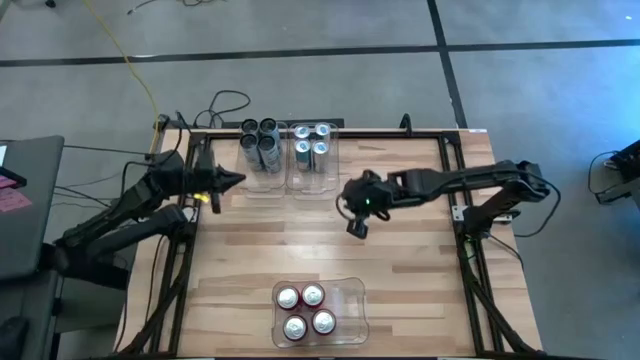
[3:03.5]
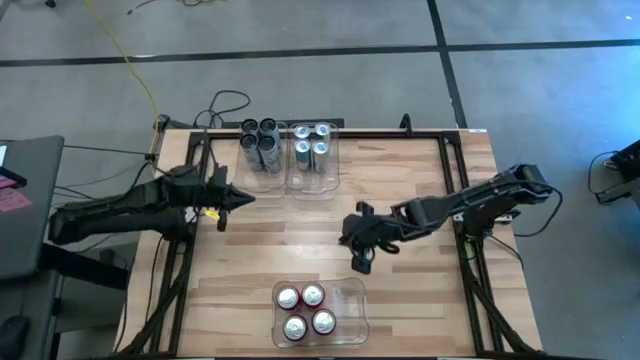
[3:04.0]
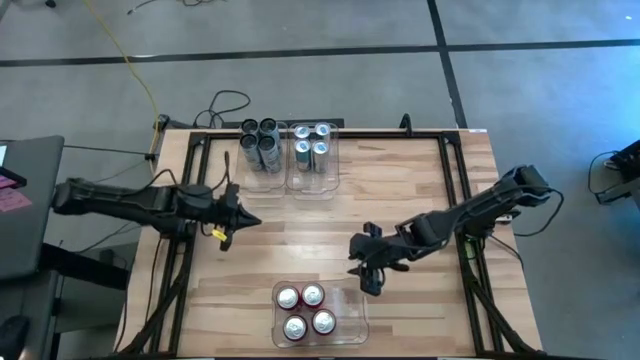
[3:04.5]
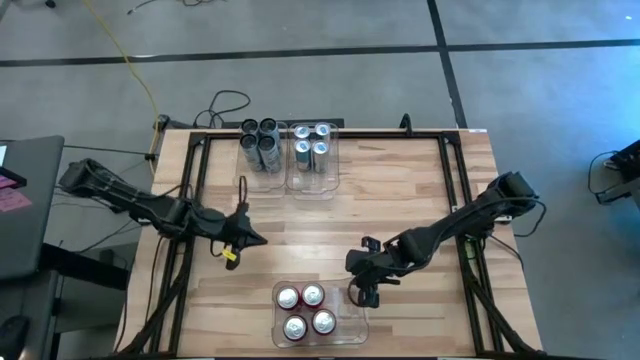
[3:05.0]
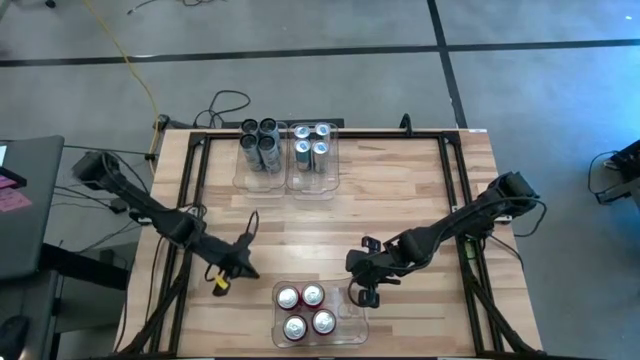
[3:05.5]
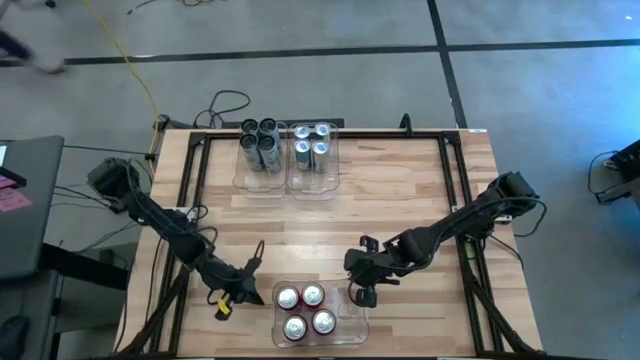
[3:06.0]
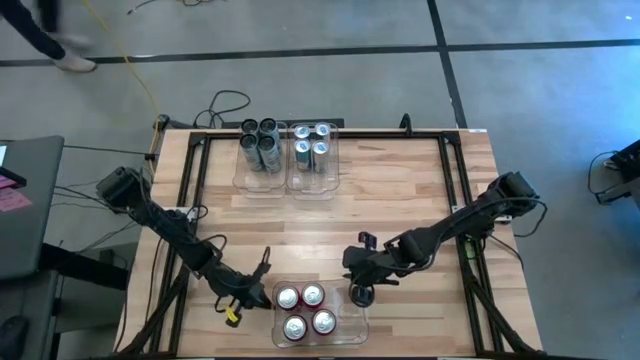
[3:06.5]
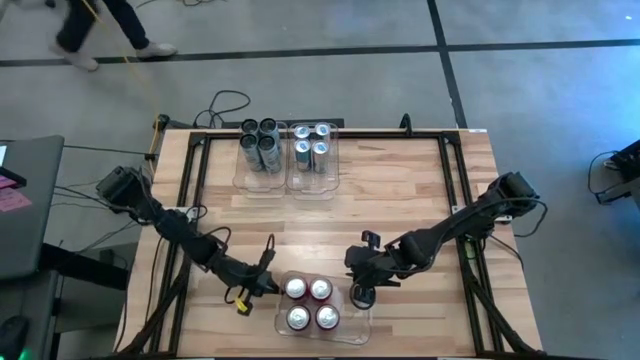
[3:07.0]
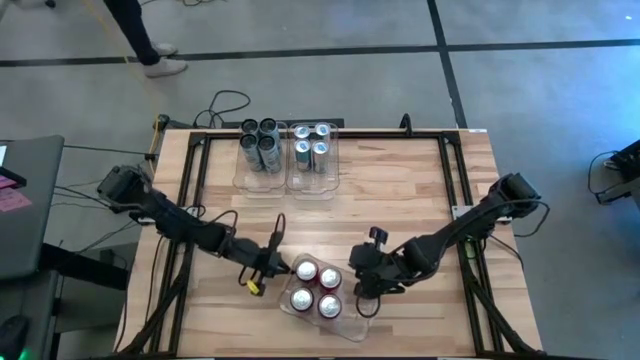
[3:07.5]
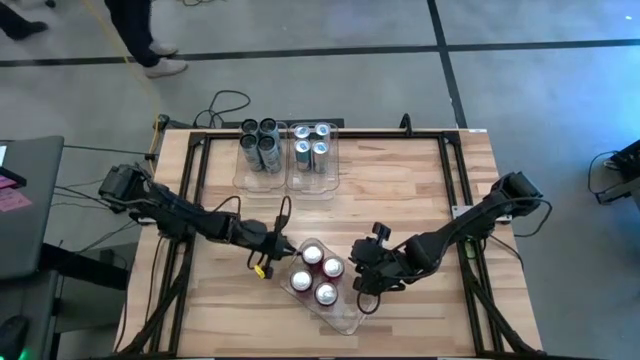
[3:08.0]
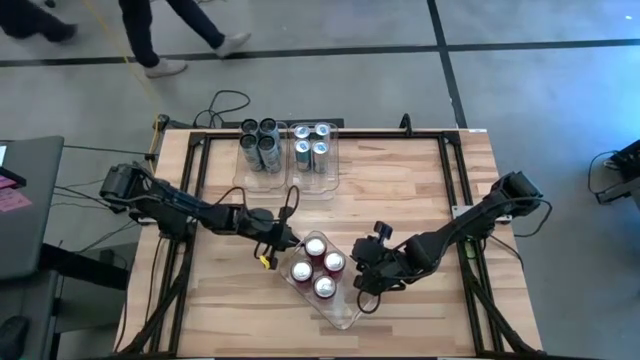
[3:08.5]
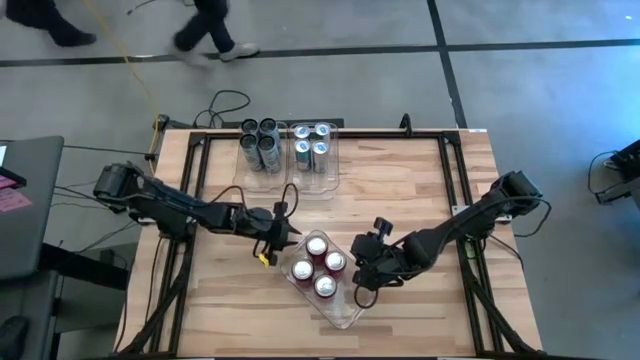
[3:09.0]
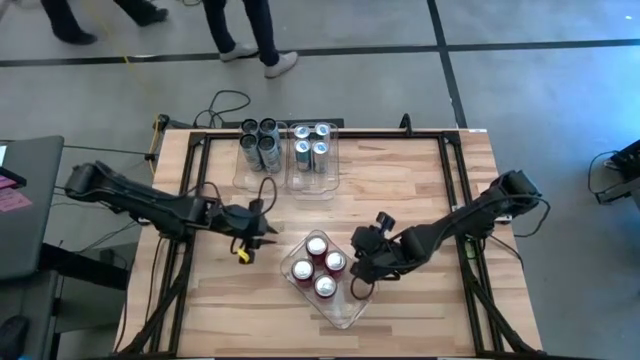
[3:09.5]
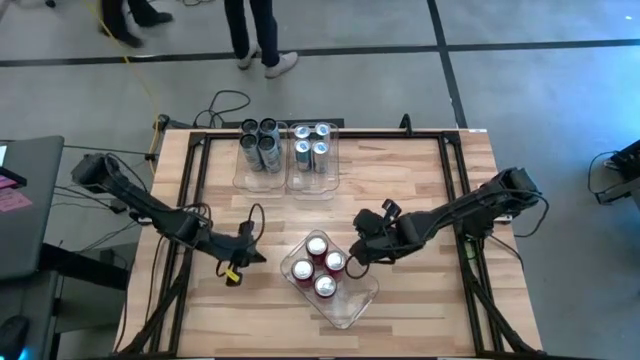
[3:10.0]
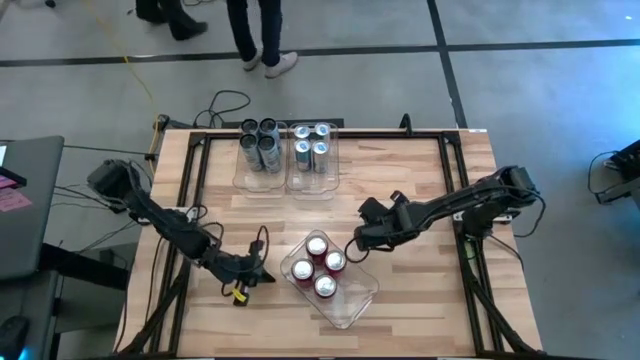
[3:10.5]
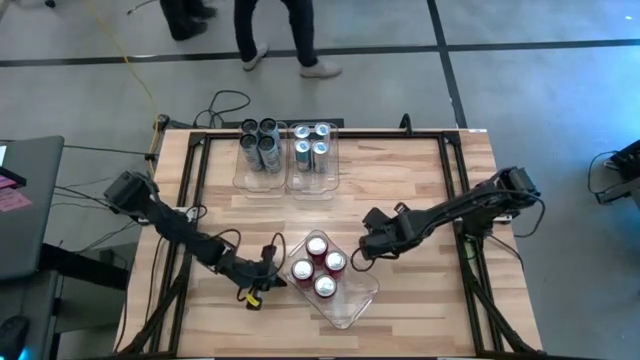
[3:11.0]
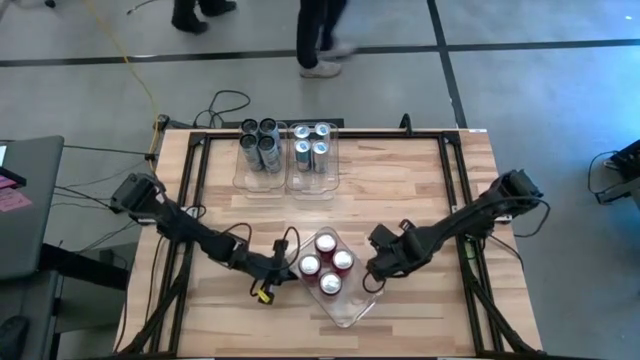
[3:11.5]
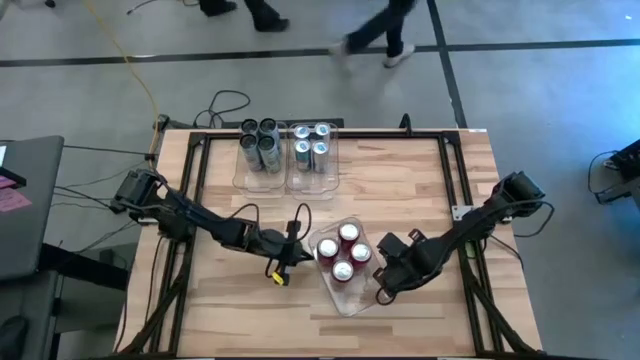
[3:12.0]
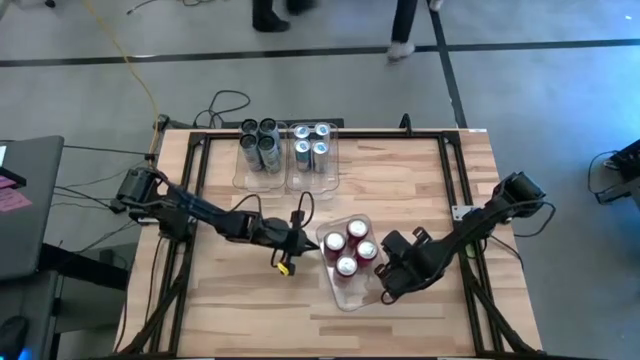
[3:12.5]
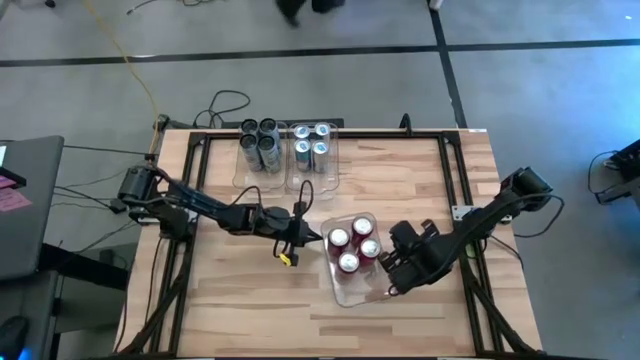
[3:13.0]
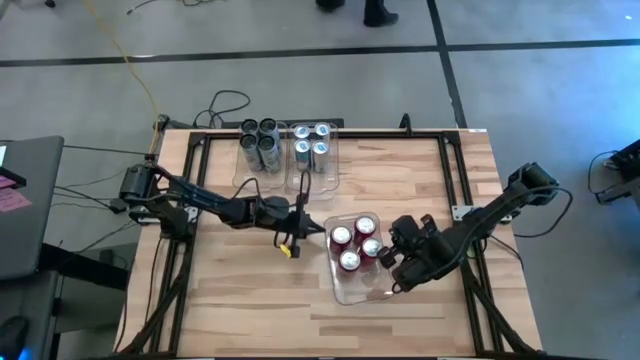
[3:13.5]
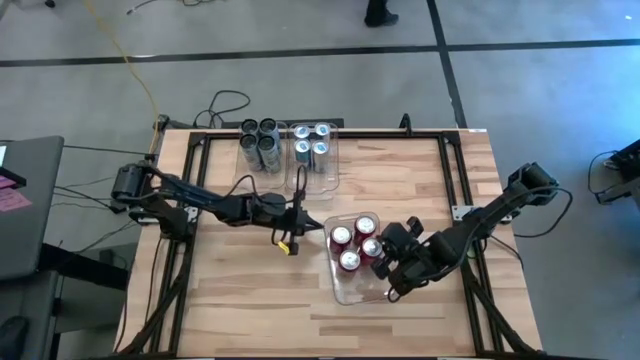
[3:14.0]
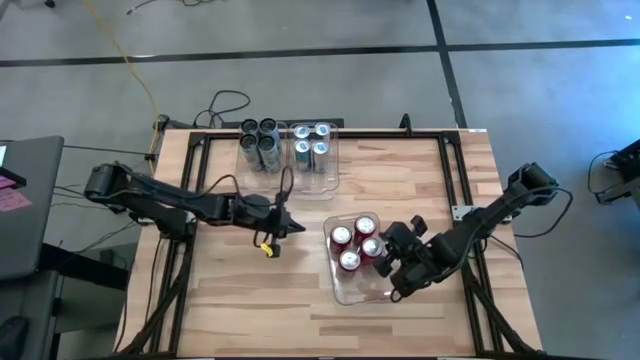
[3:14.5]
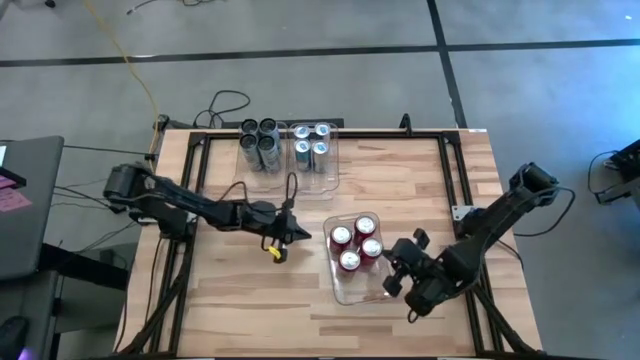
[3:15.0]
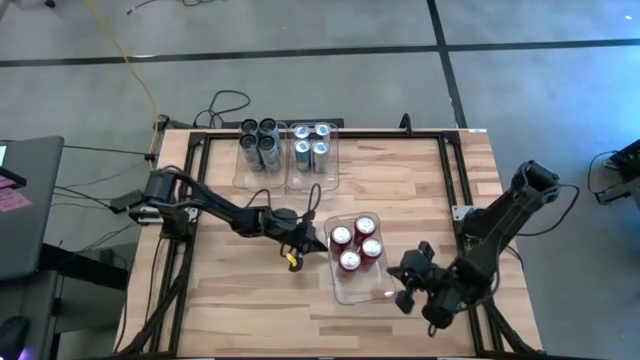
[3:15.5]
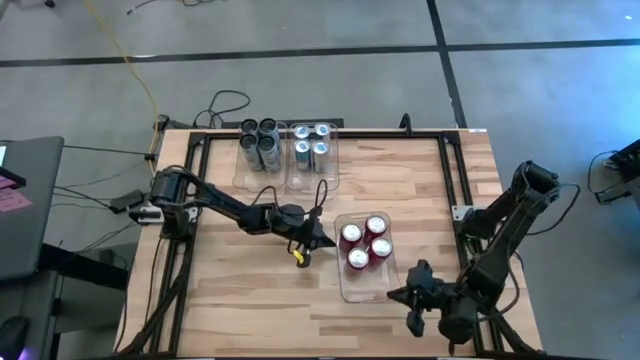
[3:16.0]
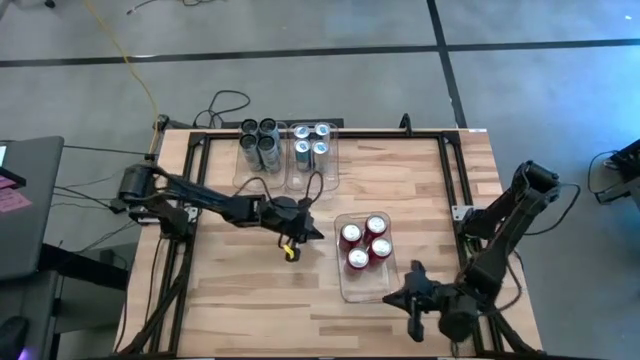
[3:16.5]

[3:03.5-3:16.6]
Task: Sort soda cans
Move the bottom transparent bin from the bottom to the top right

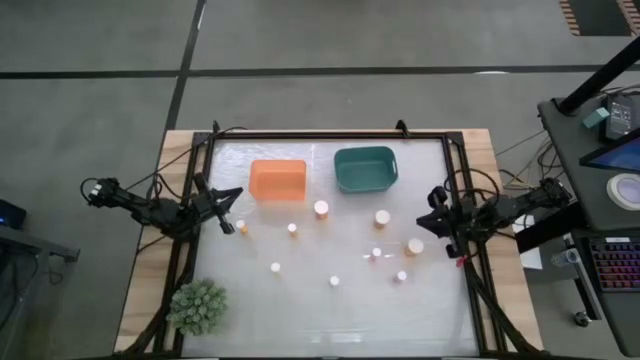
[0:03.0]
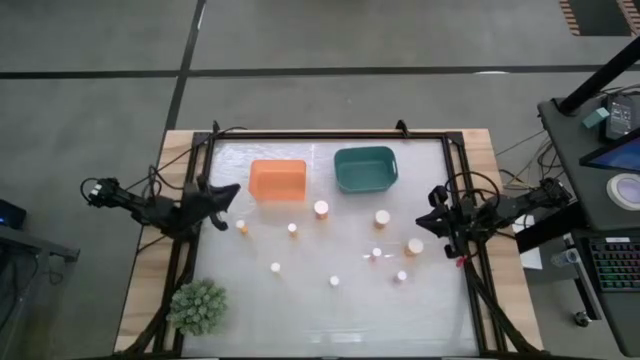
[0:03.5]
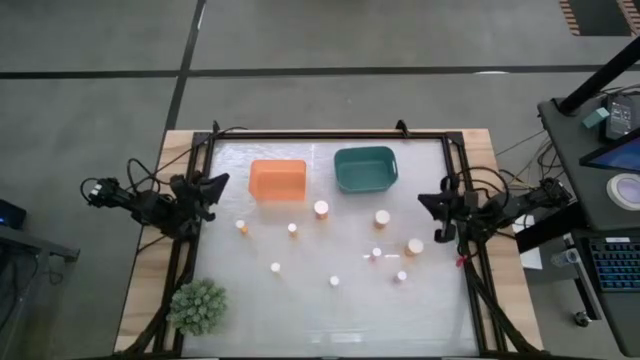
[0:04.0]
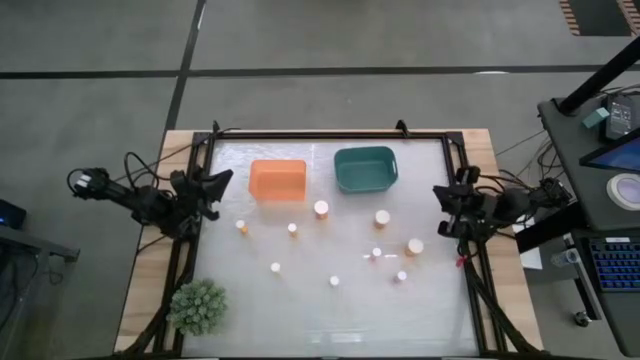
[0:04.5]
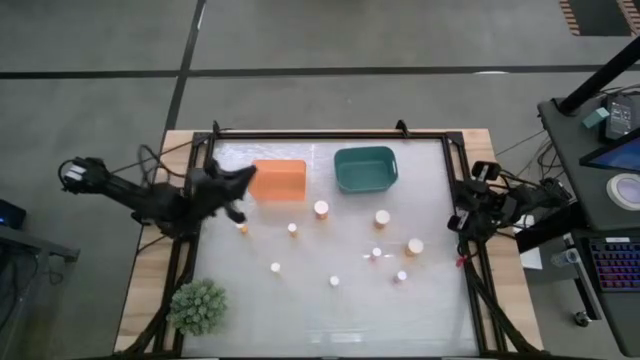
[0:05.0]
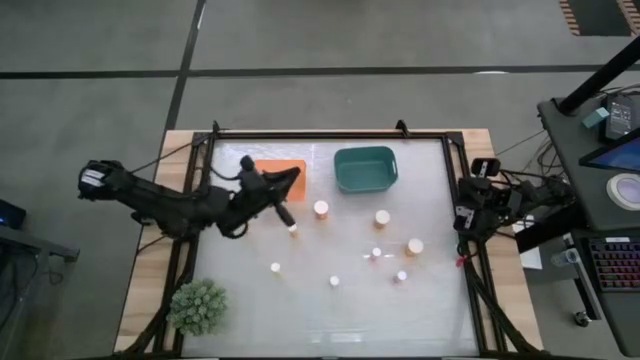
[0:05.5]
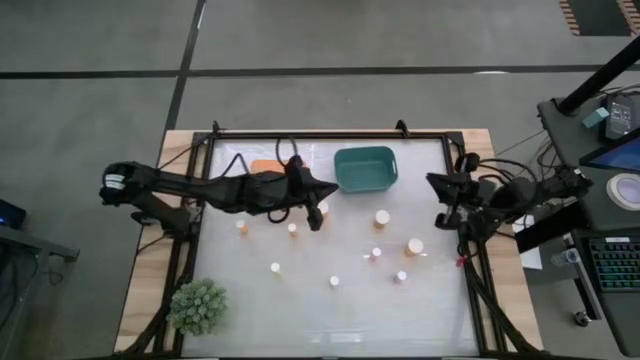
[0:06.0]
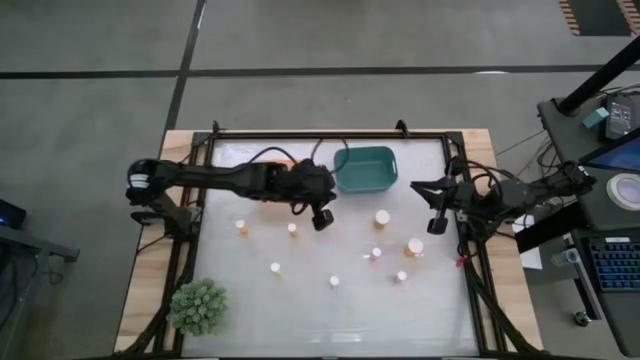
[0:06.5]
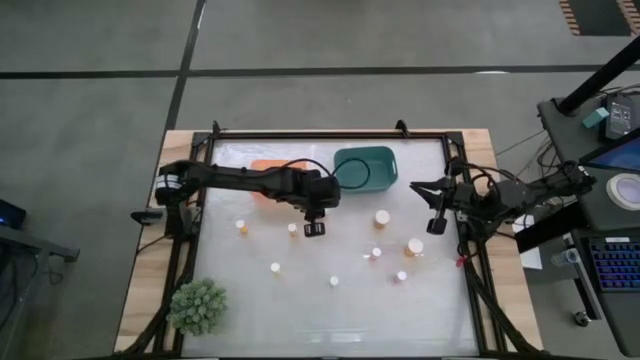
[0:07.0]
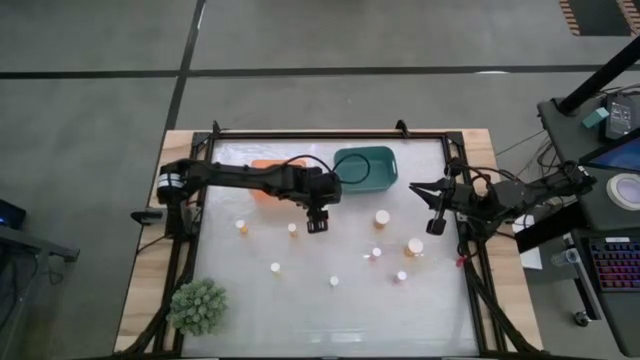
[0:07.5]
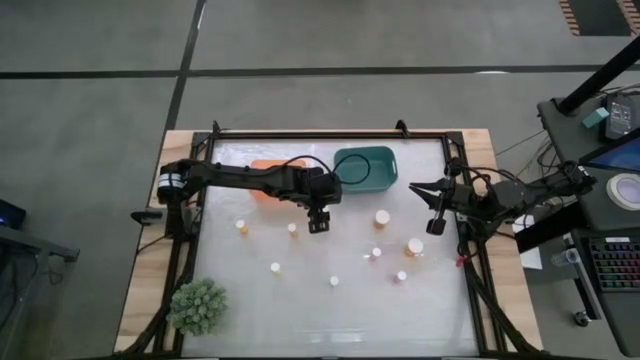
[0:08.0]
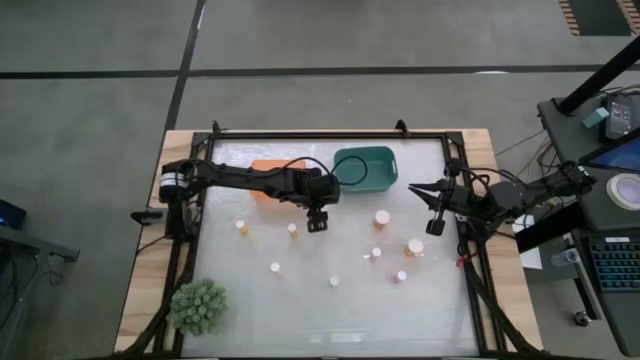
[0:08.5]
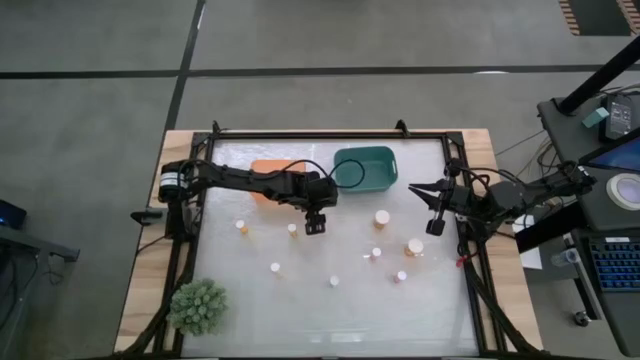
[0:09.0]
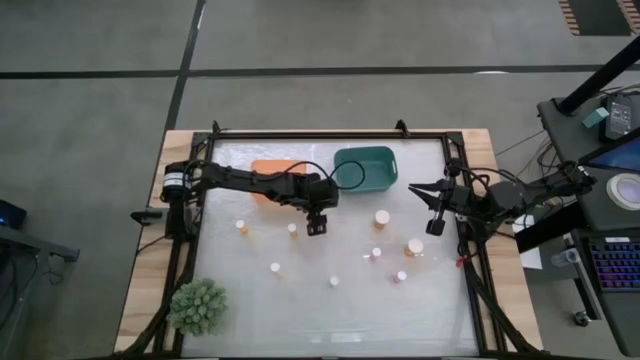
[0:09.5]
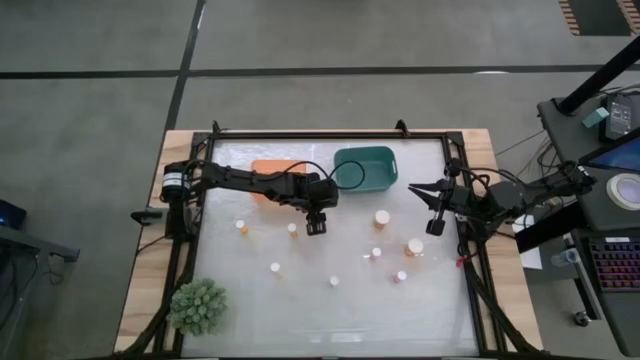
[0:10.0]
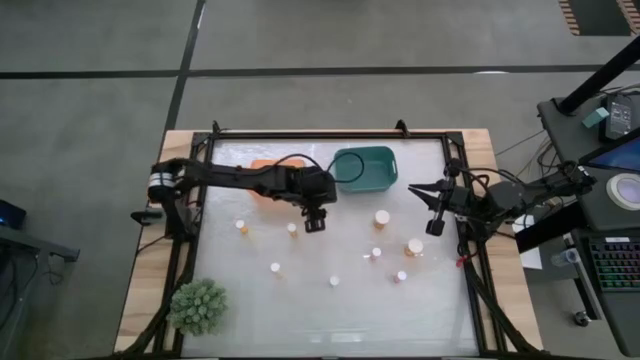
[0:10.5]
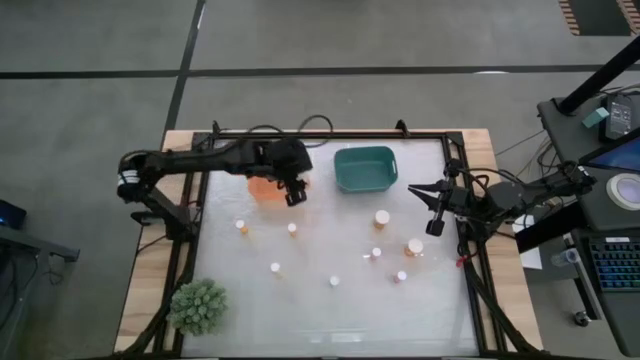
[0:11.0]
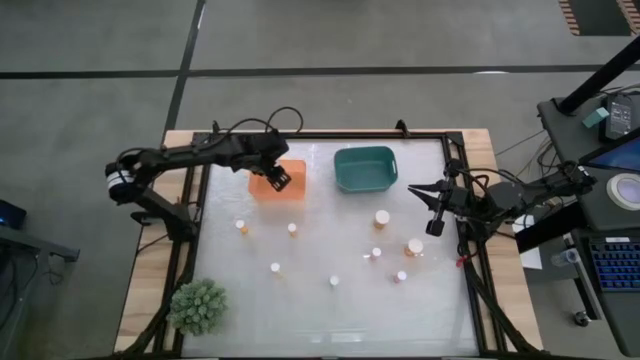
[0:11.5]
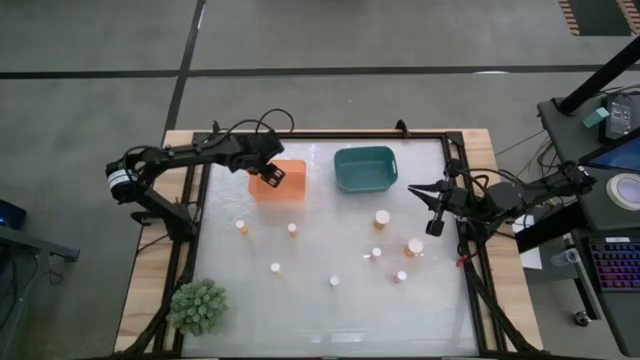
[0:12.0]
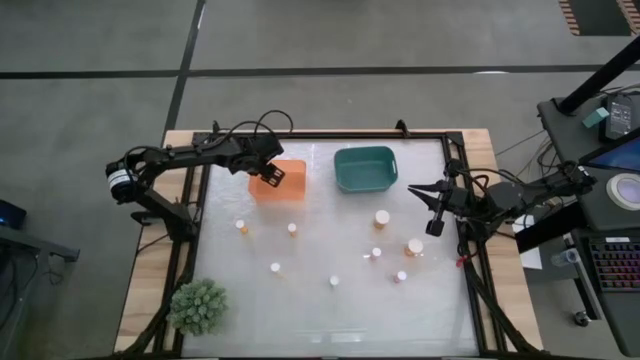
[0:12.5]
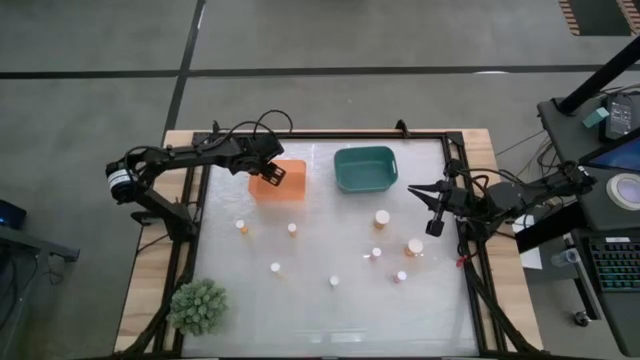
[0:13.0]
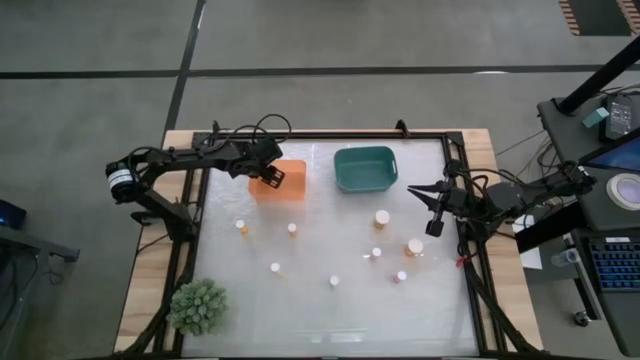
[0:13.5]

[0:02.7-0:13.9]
Task: Pick and place medicine bottles into bin by pill shape (circle, oval)
Put the top left large orange pill bottle into the orange bin
